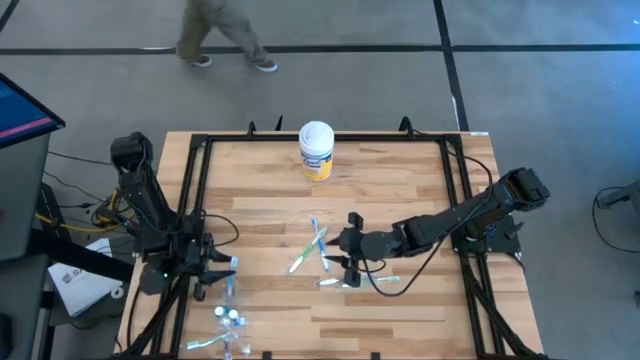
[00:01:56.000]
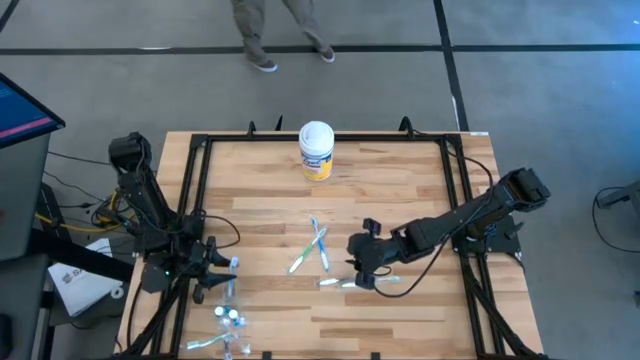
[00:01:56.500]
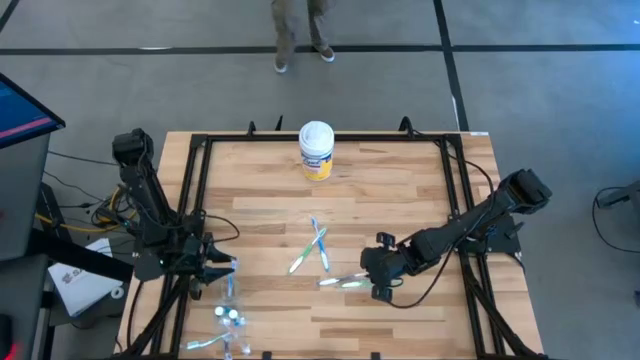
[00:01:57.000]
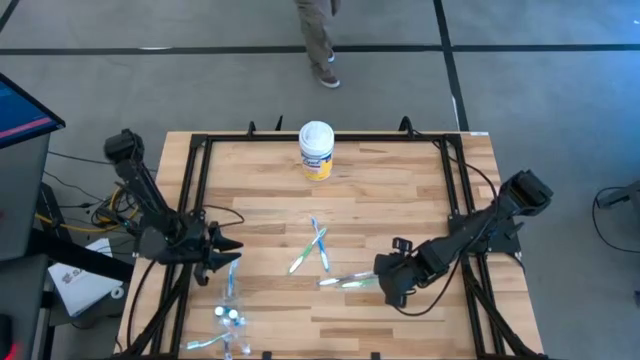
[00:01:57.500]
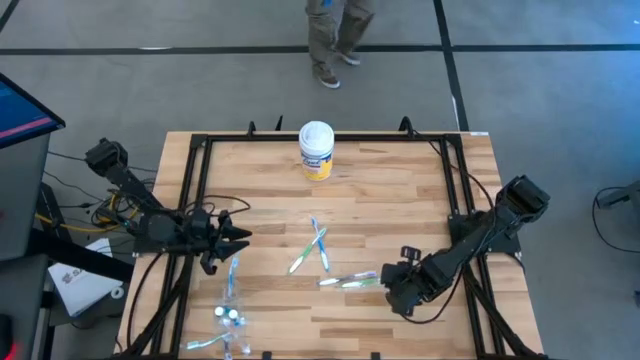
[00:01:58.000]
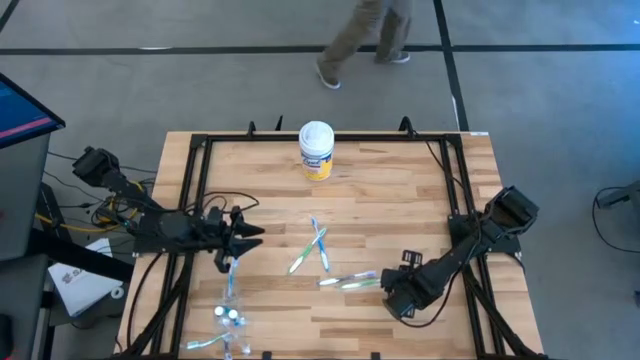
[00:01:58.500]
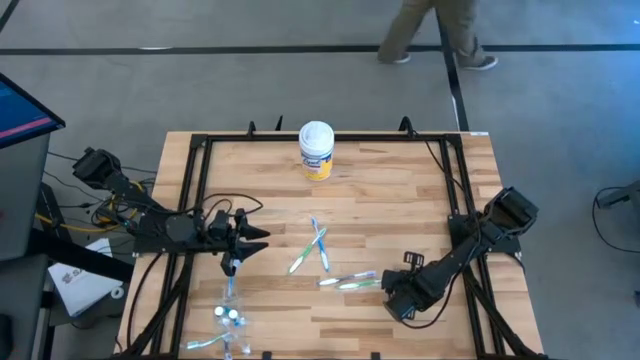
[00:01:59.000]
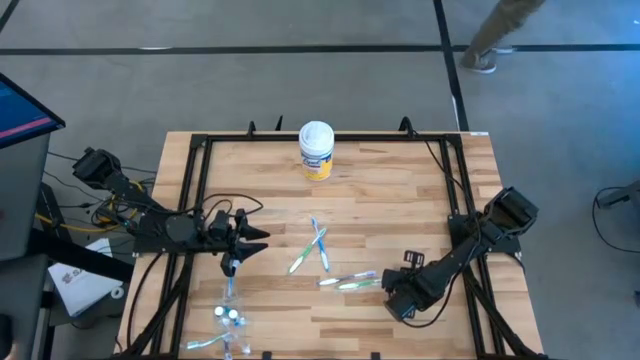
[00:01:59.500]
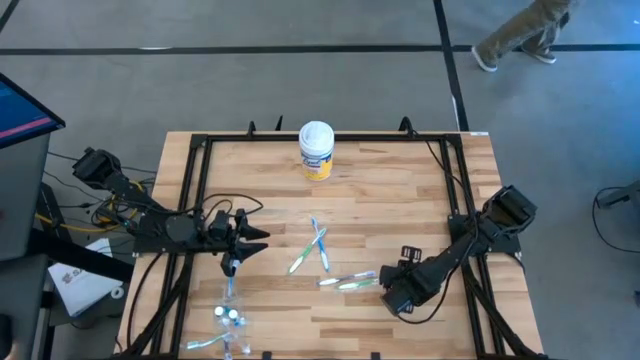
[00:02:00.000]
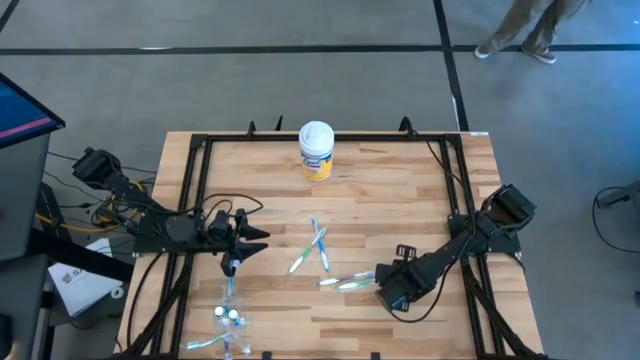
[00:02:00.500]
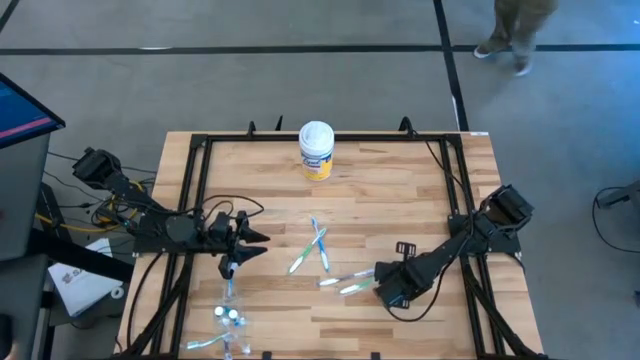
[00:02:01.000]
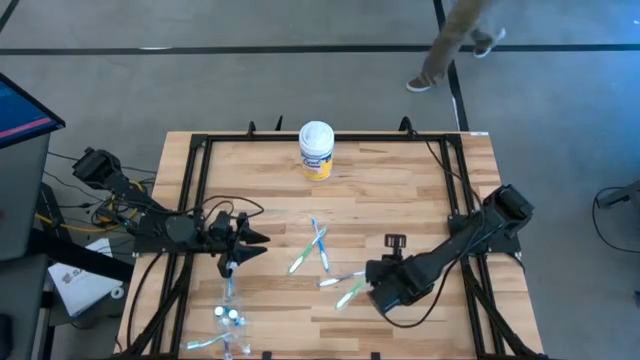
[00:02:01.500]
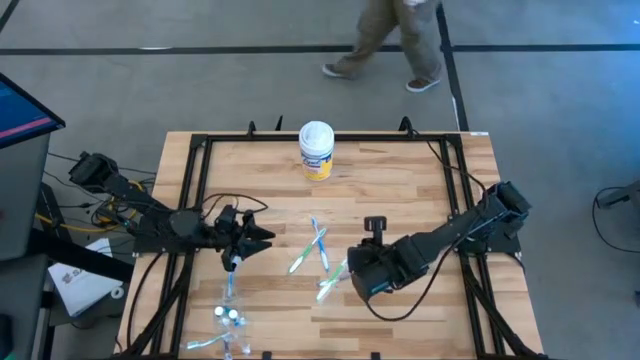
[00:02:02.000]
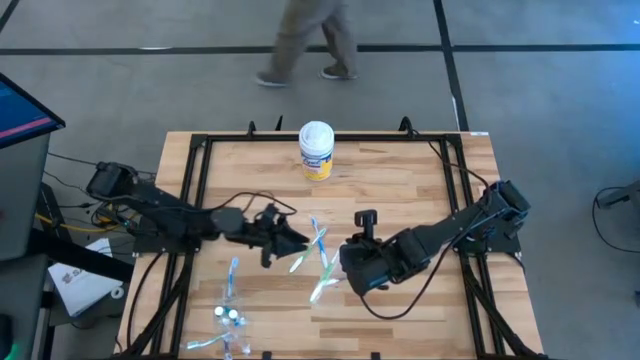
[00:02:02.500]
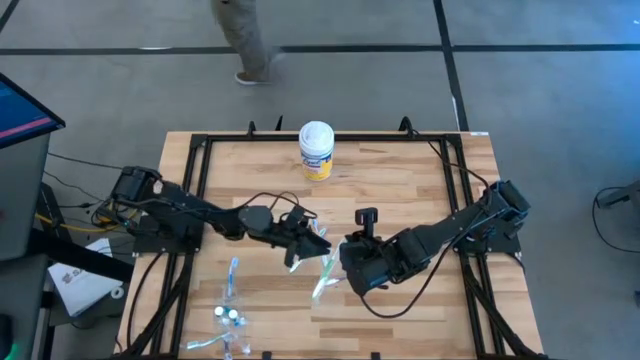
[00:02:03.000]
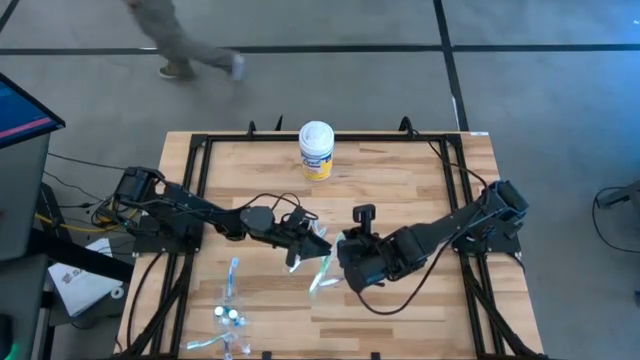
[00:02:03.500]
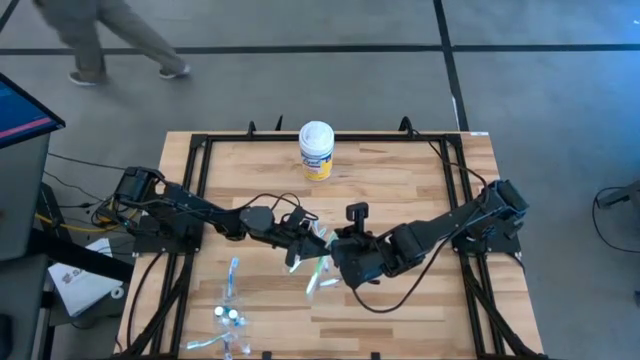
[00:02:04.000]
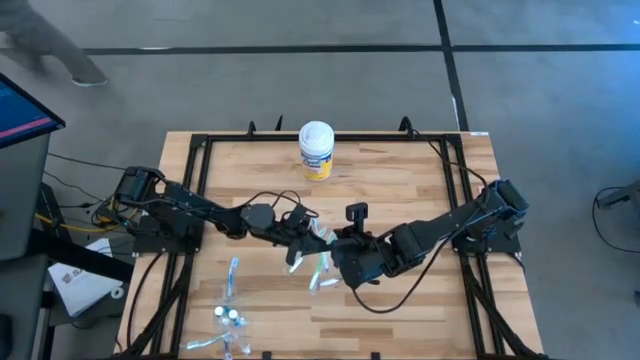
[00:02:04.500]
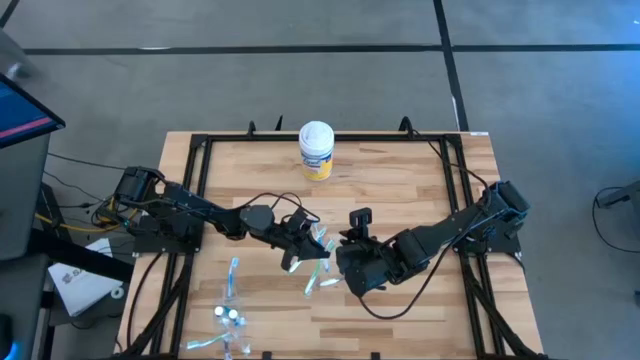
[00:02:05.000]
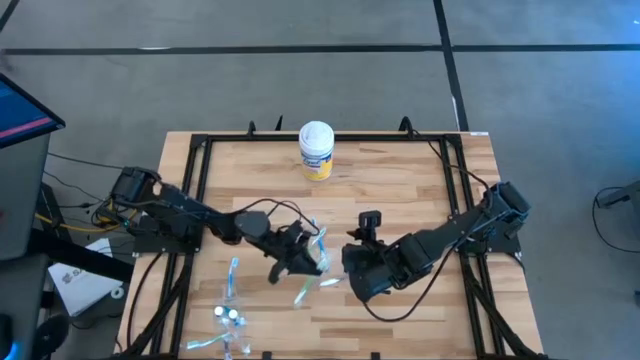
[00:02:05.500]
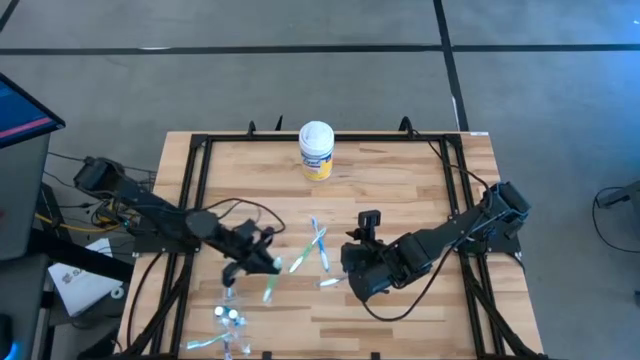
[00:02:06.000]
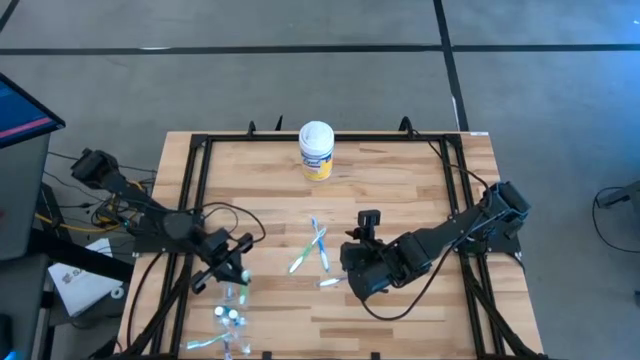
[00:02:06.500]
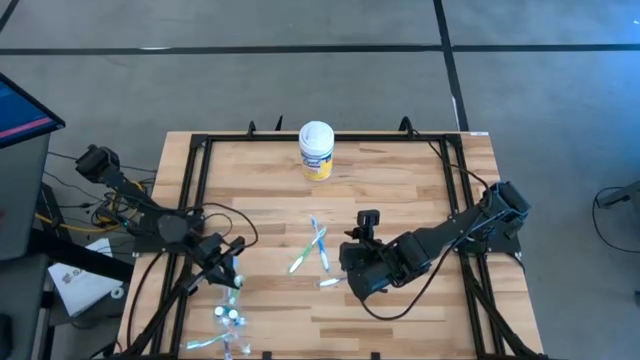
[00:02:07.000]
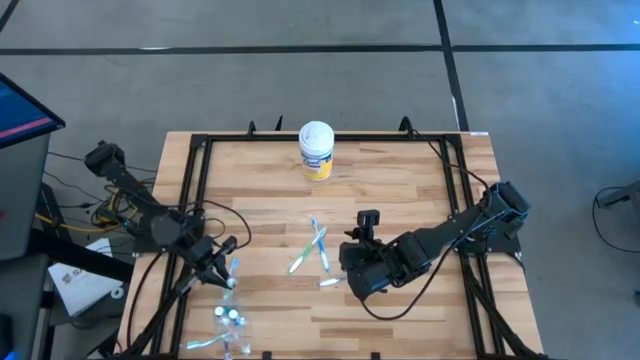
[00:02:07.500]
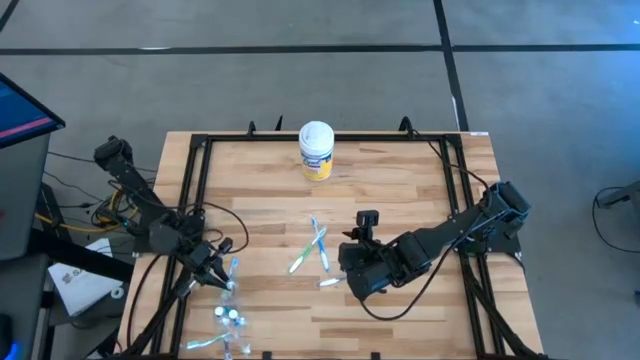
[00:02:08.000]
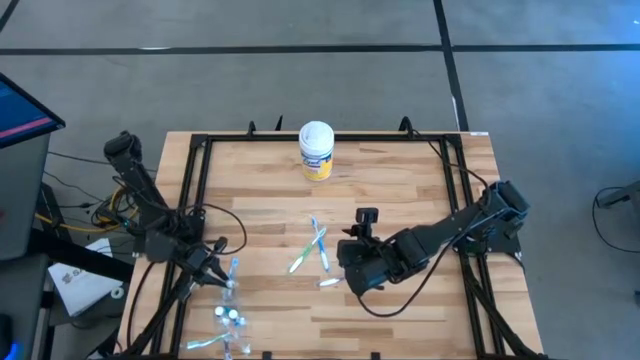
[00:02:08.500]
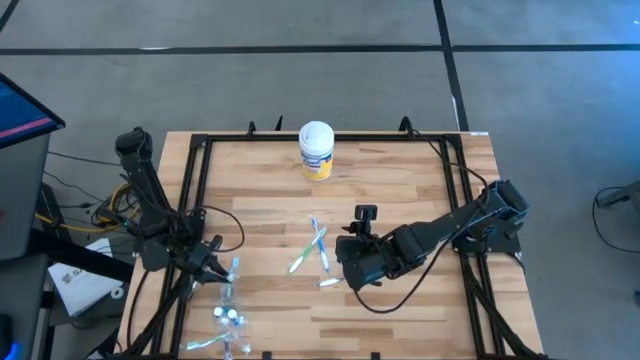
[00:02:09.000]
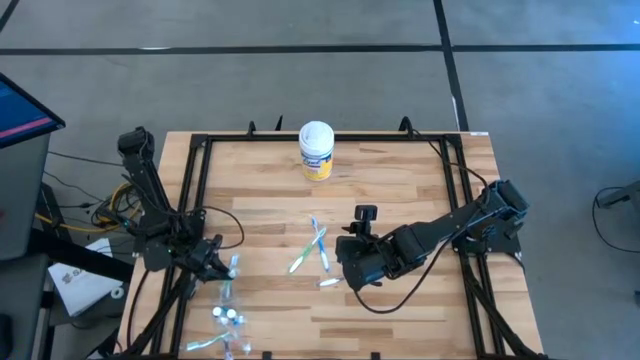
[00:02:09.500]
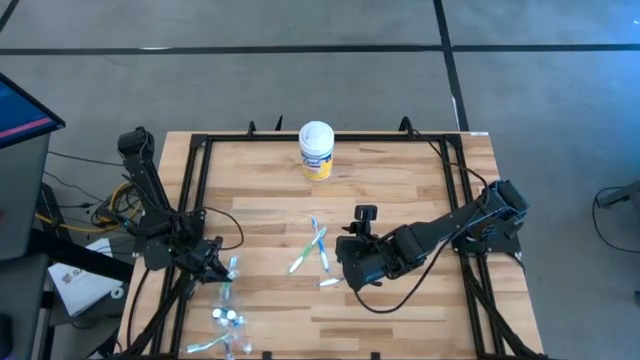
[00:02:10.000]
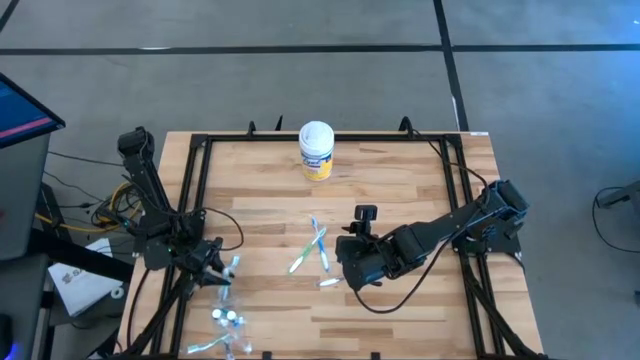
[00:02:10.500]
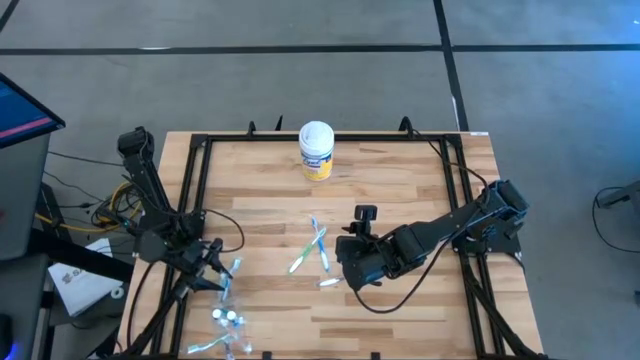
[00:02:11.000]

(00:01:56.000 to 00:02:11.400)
Task: Pick & Place toothbrushing station
Put the right green toothbrush into the transparent organizer

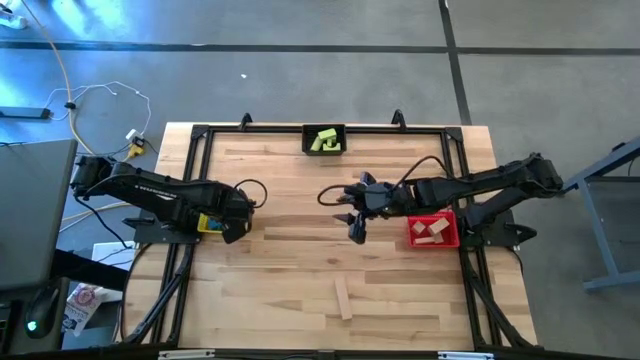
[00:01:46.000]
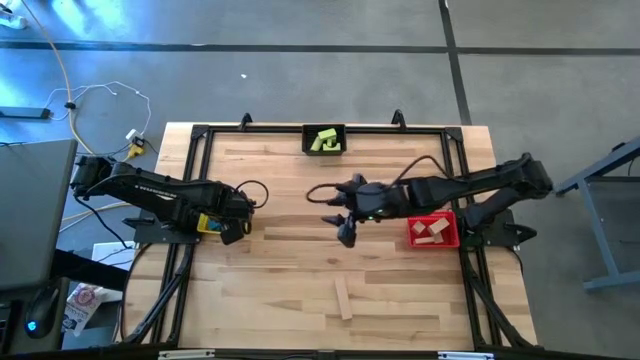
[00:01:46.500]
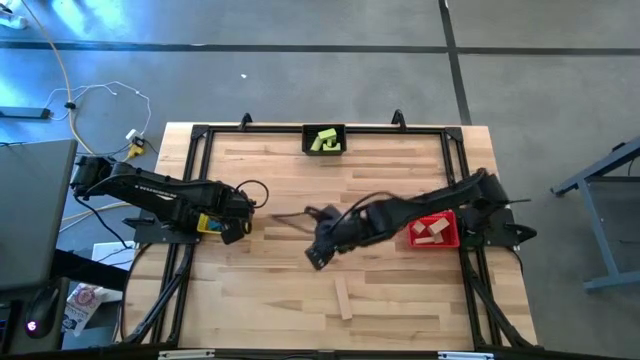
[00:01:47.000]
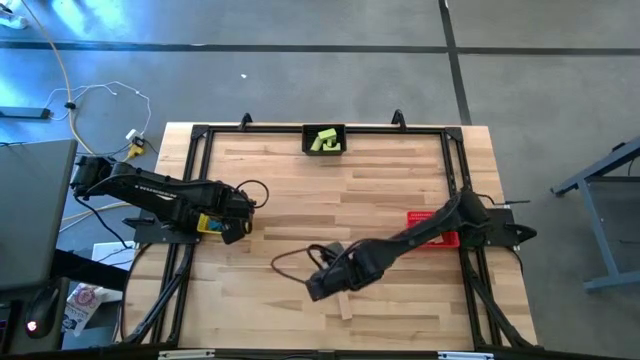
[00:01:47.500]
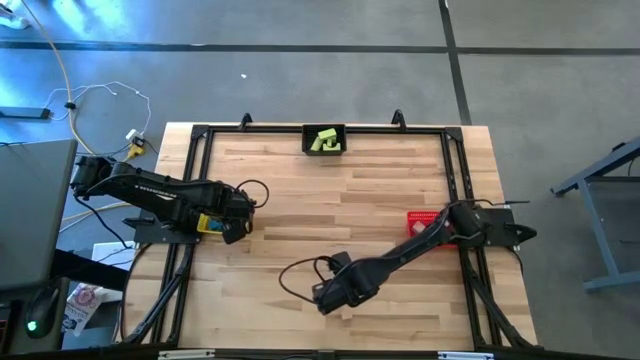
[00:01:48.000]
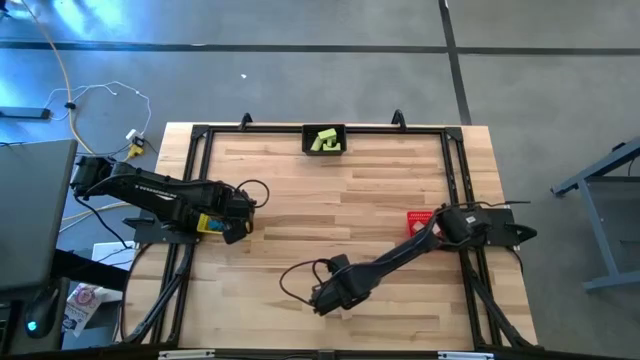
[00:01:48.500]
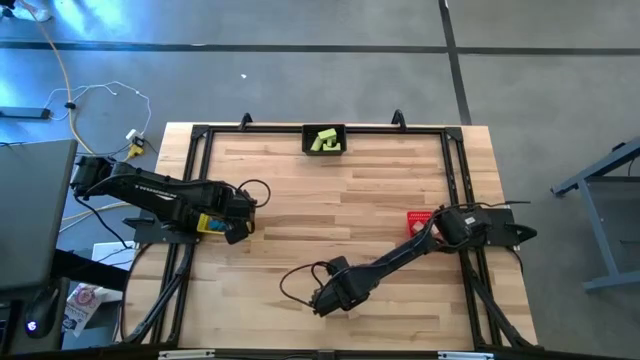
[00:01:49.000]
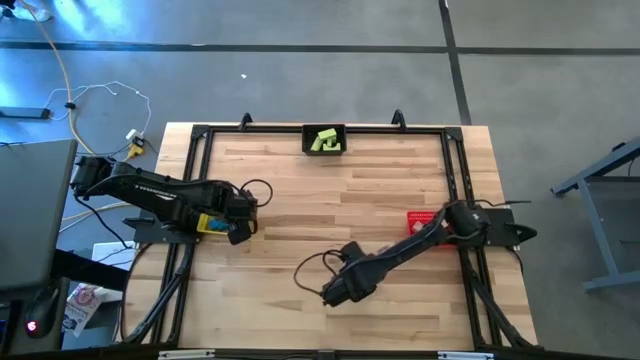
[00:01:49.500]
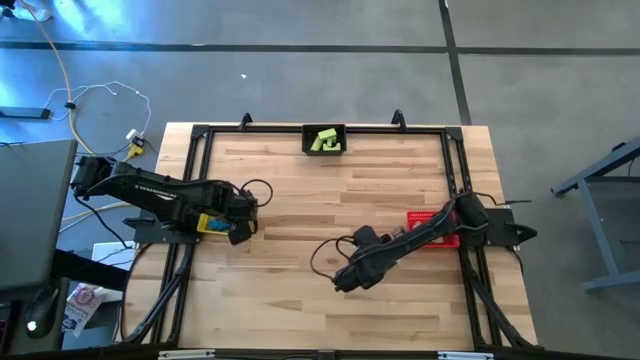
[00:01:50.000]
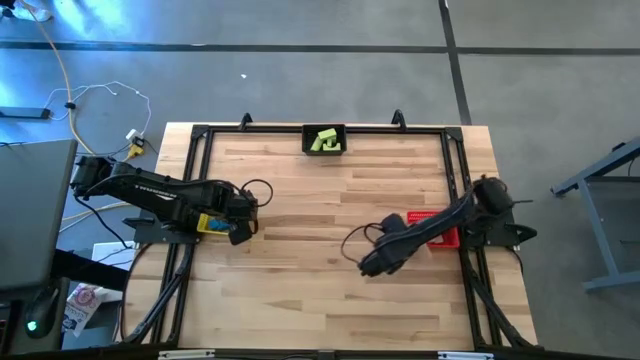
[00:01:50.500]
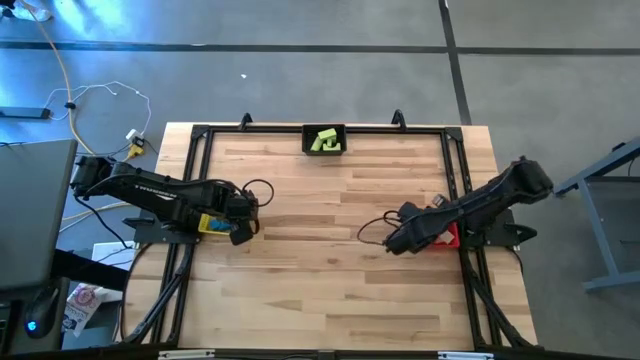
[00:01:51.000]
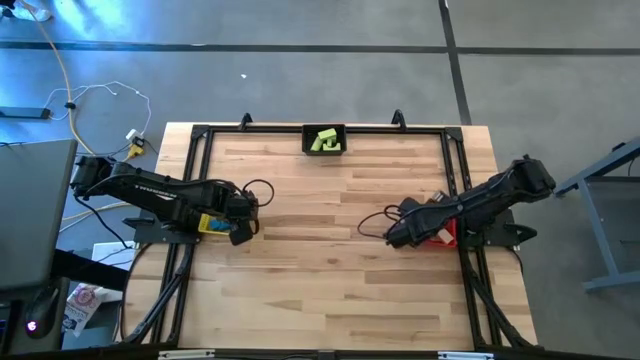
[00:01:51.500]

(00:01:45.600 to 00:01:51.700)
Task: Sort & place blocks by color
Put the light brown block into the red bin
